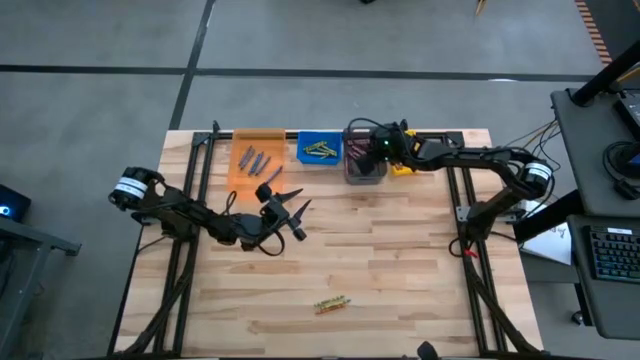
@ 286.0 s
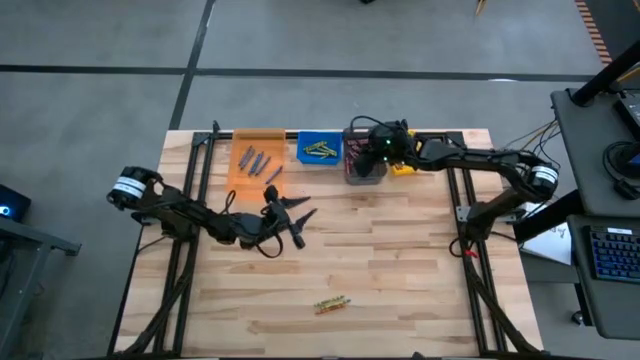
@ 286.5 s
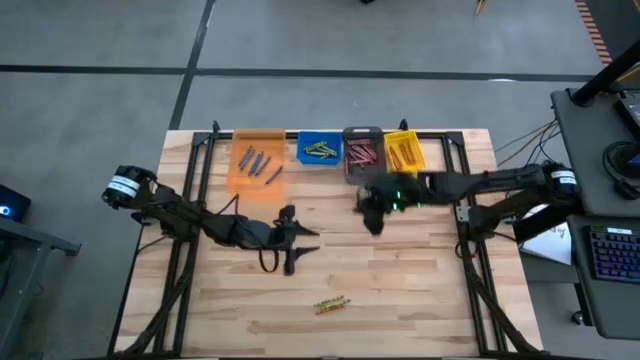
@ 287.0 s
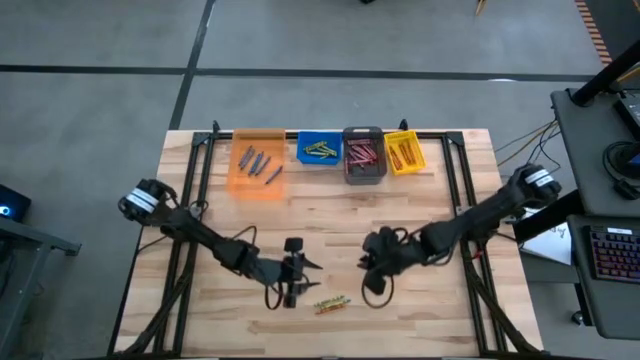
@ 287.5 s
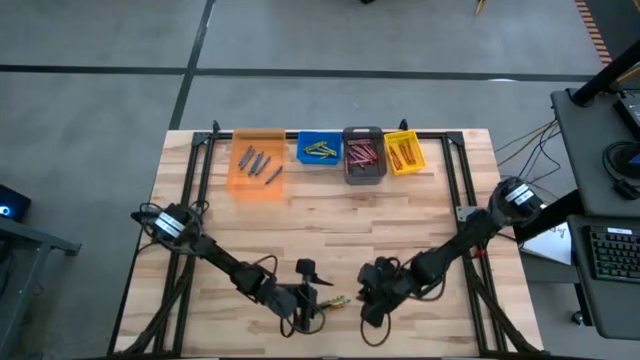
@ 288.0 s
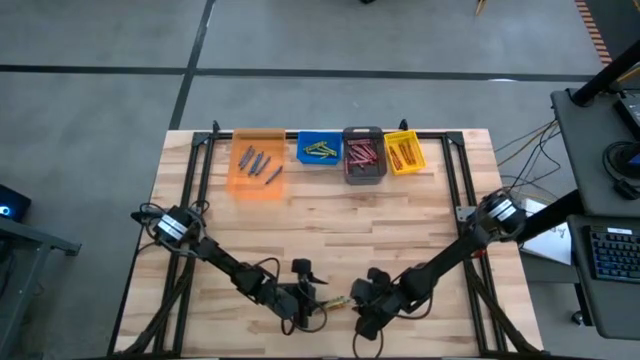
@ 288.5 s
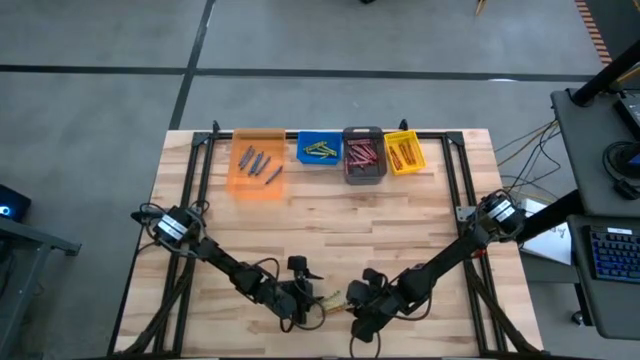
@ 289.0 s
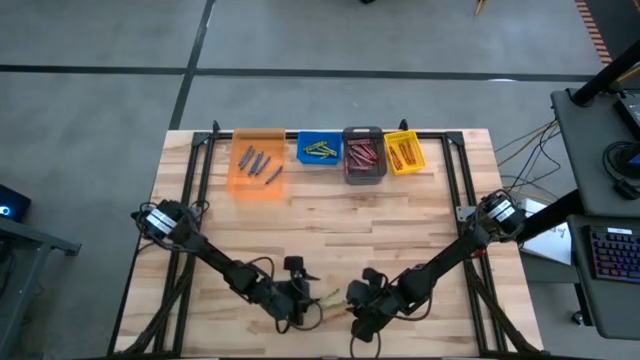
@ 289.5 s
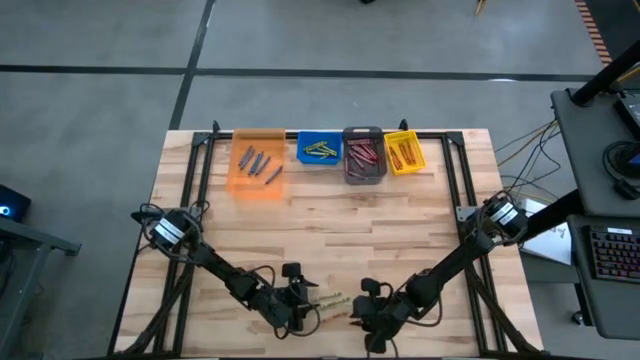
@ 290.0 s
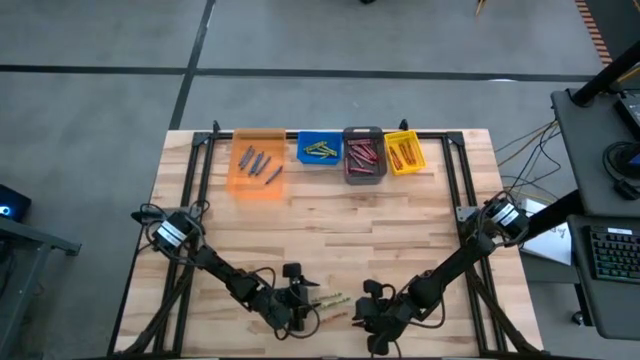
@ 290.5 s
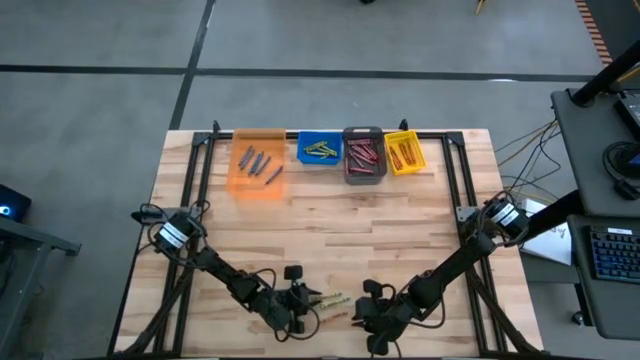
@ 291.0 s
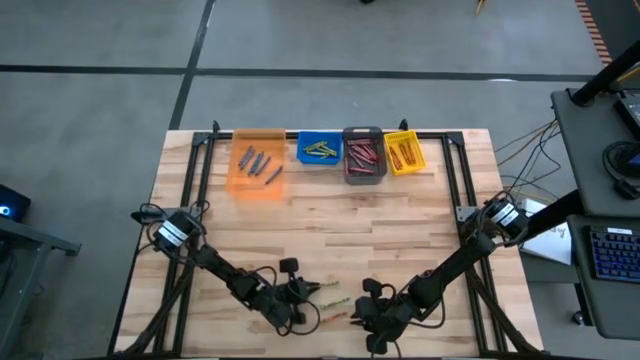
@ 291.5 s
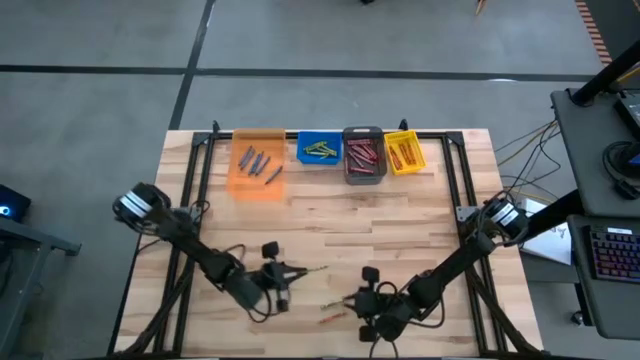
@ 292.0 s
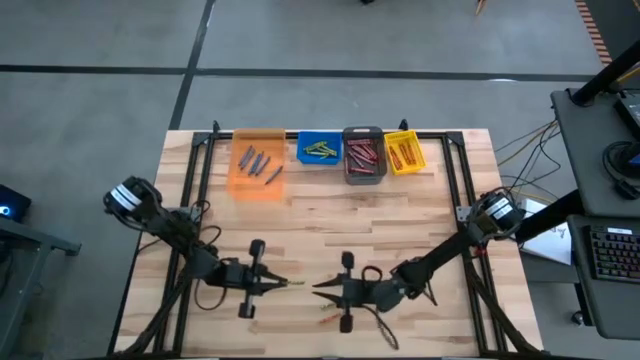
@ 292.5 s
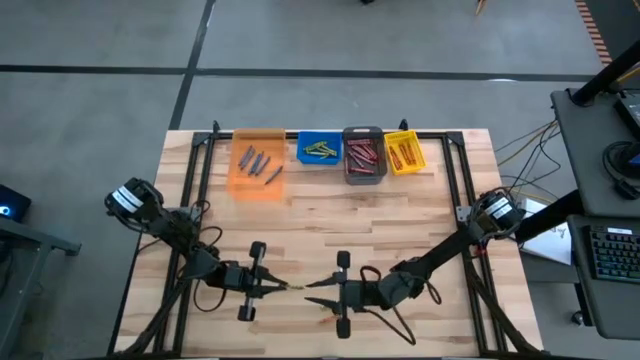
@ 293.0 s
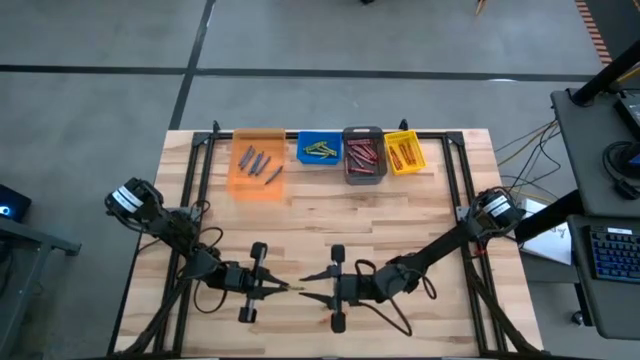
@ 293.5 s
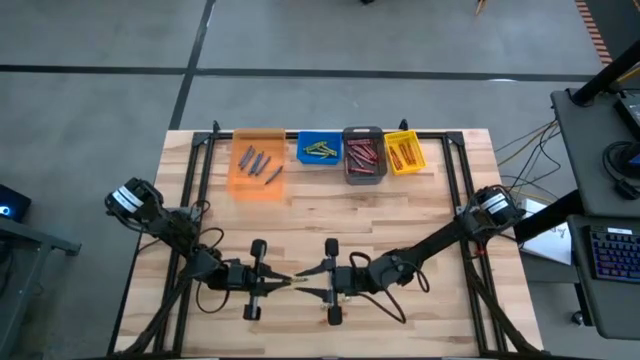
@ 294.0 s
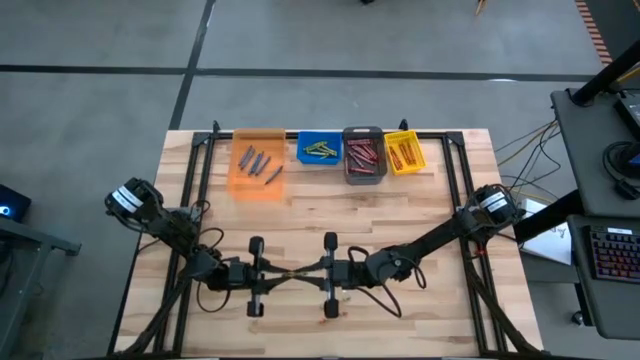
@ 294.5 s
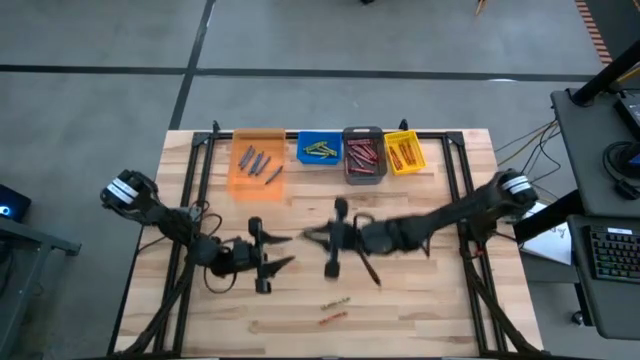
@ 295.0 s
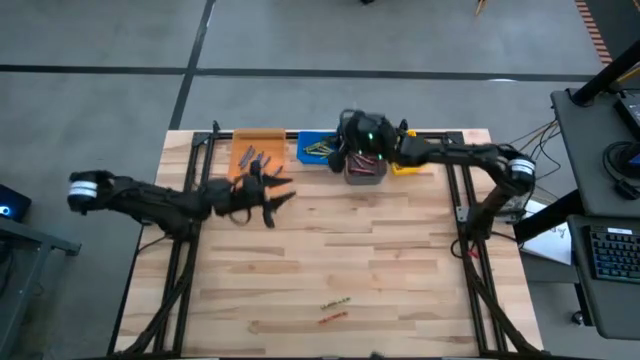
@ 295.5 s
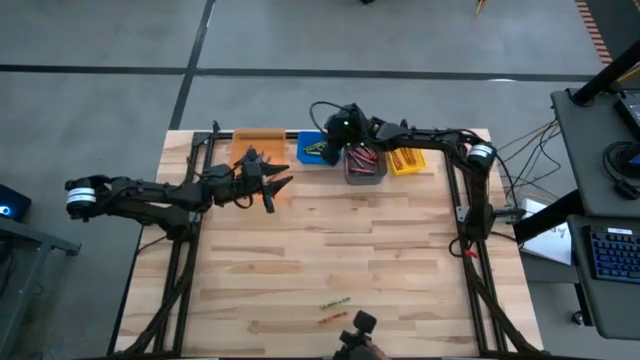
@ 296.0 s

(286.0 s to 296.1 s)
Task: Sort crayons
Put the green crayon into the blue bin

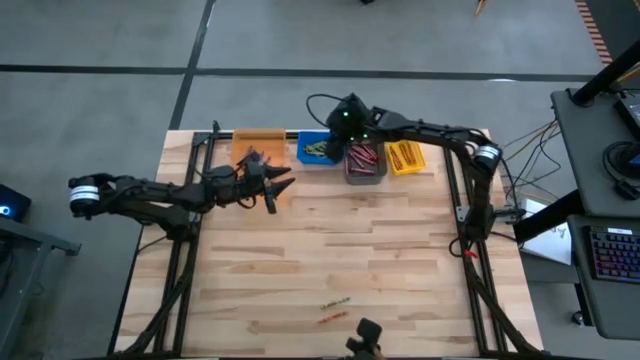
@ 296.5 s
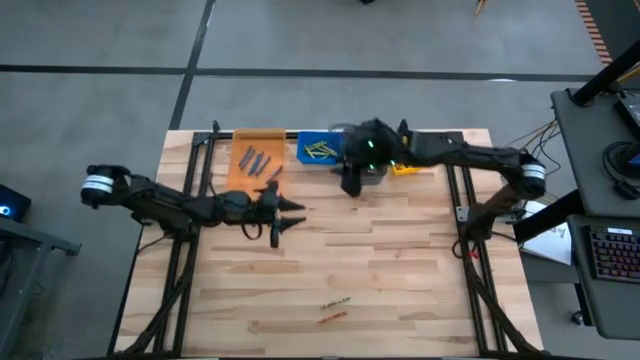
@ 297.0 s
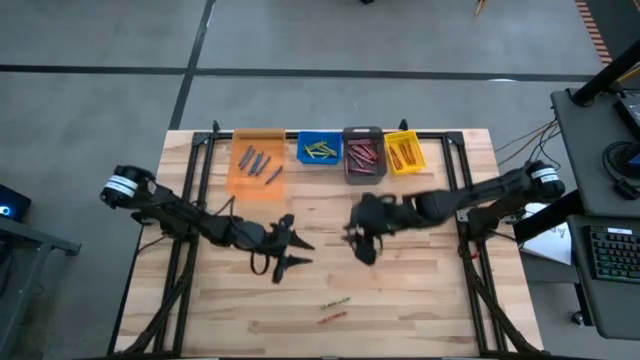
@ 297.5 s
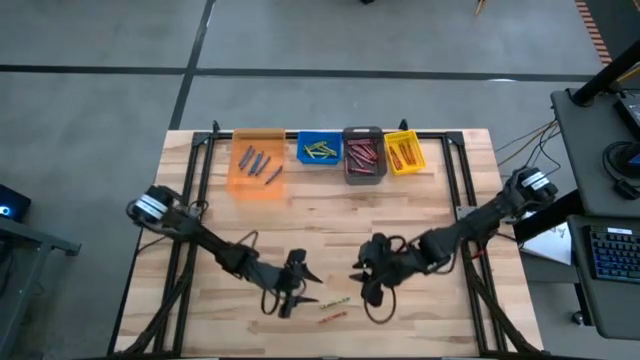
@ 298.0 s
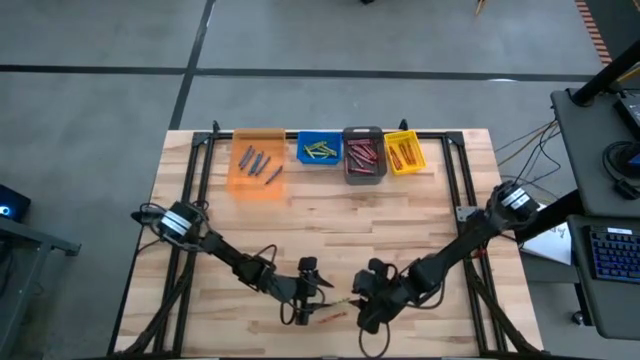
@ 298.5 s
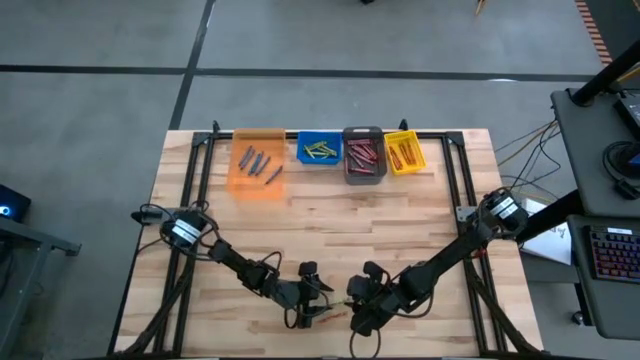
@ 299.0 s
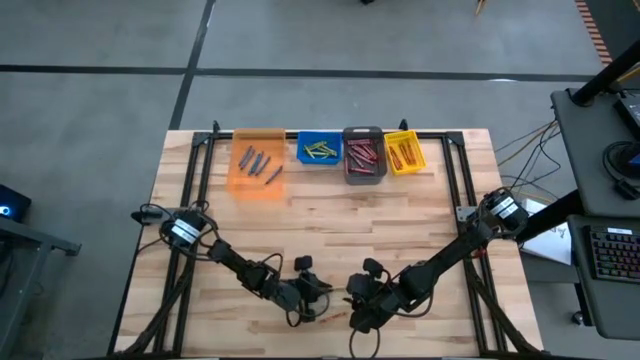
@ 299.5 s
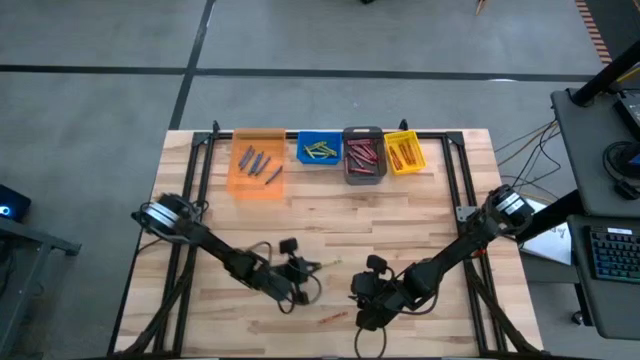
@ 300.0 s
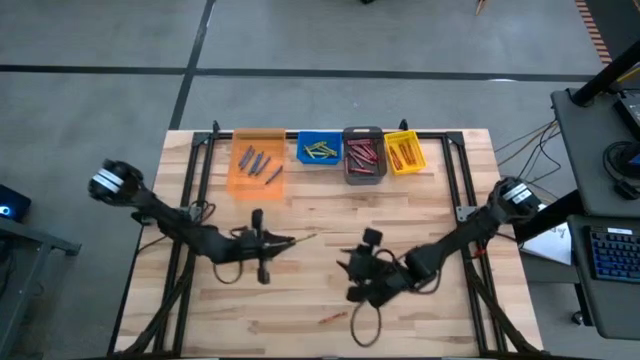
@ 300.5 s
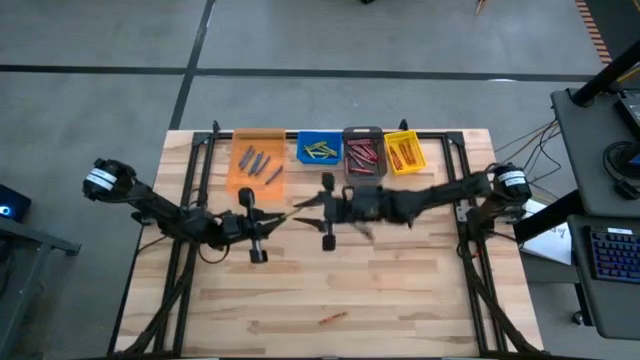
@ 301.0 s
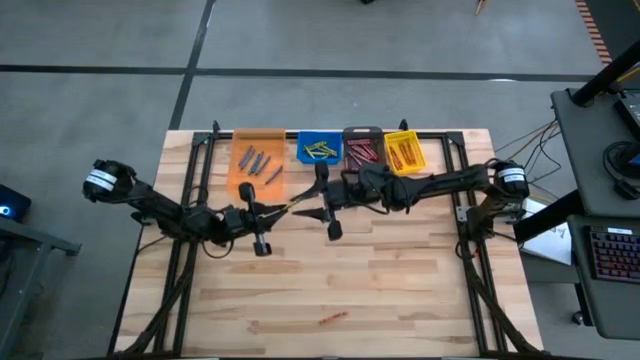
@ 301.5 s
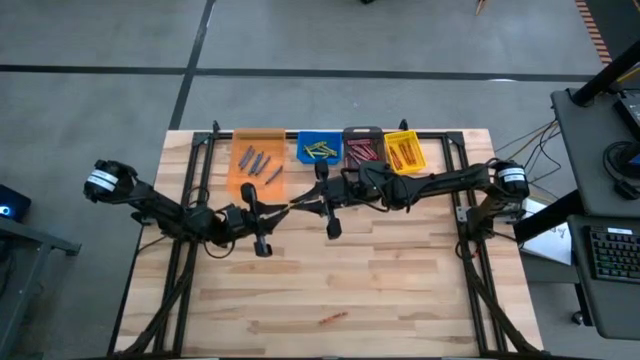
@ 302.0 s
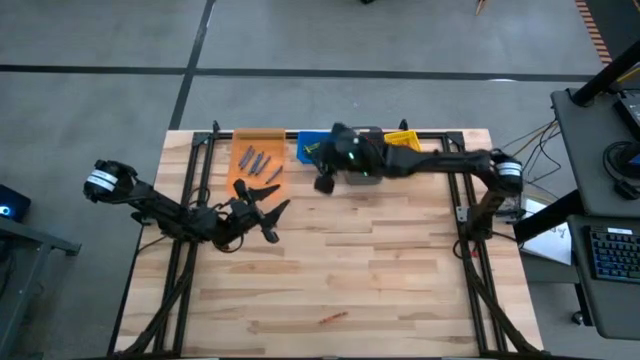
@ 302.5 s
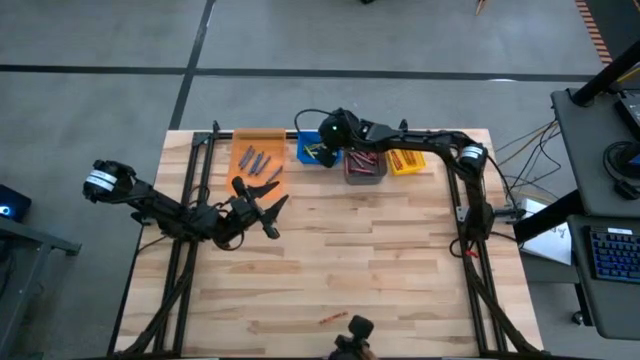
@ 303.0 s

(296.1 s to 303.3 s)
Put the green crayon into the blue bin

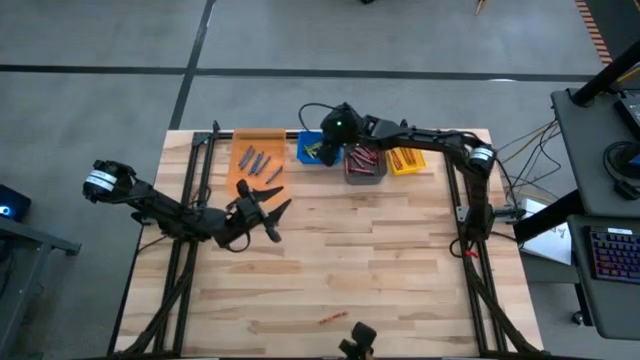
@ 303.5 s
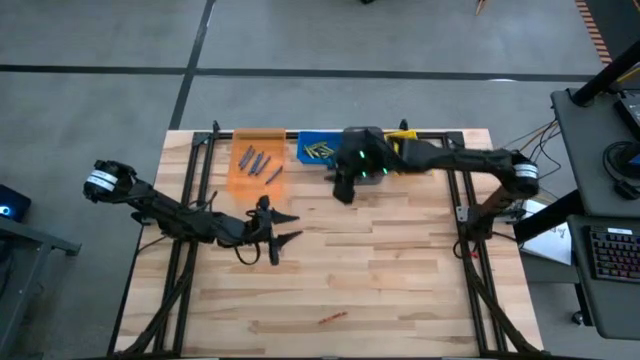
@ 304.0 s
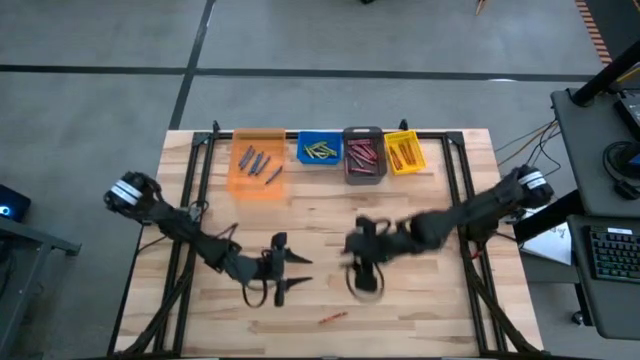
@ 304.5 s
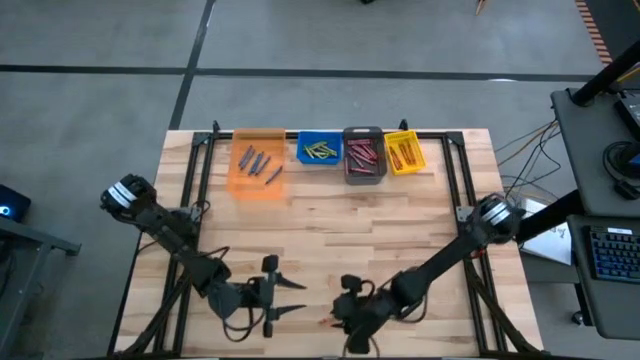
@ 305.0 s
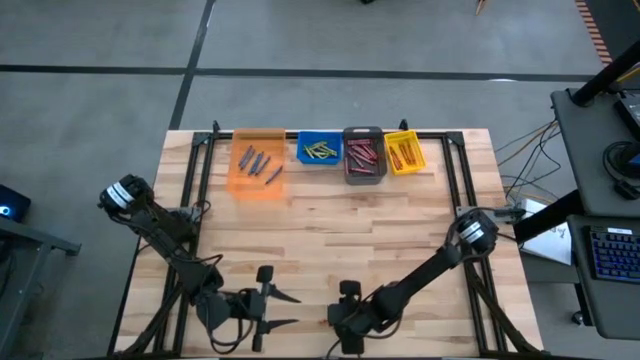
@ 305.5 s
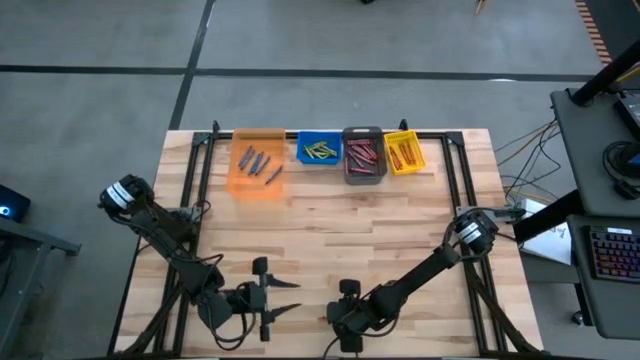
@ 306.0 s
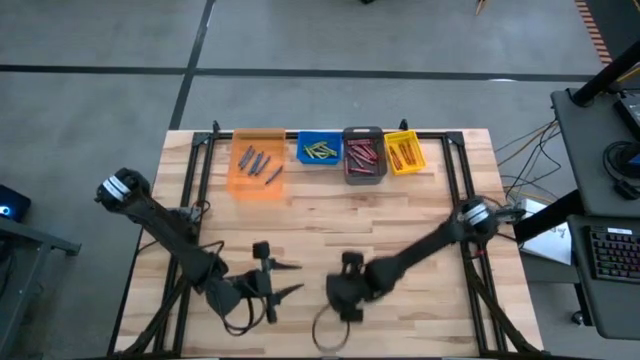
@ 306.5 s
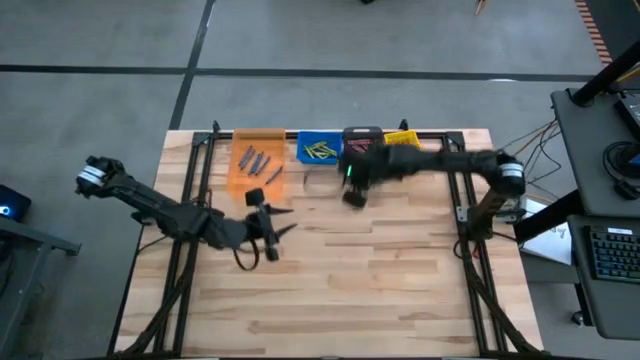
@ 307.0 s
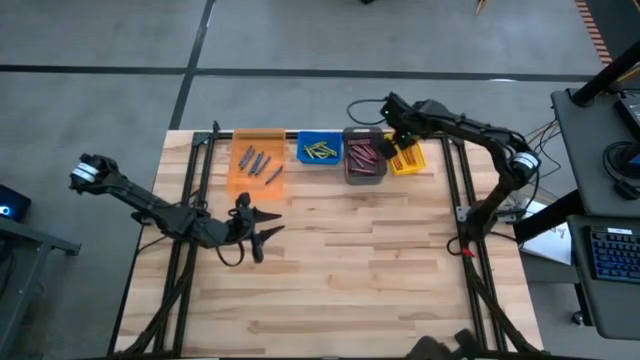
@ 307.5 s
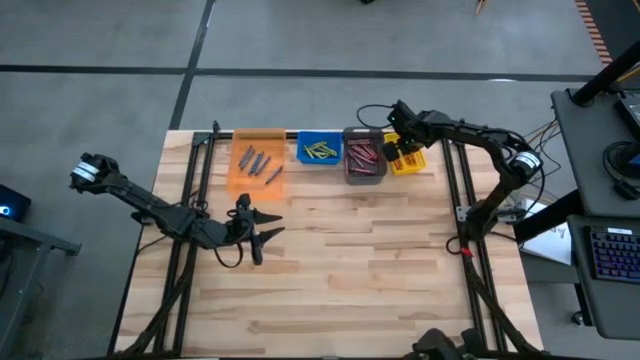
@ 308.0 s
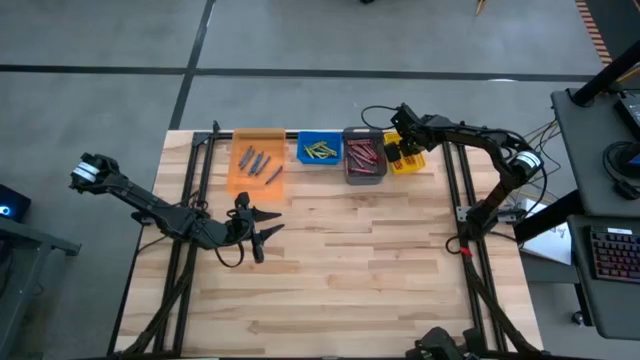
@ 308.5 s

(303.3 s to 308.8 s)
Put the orange crayon into the yellow bin
